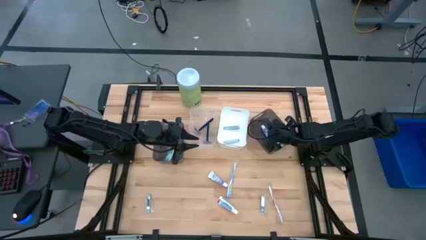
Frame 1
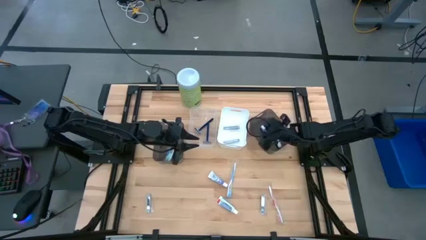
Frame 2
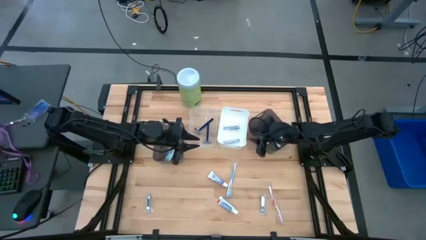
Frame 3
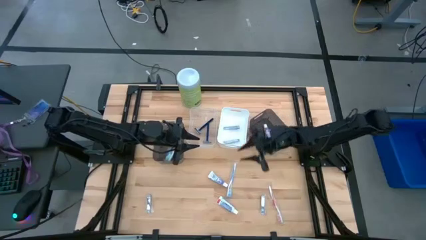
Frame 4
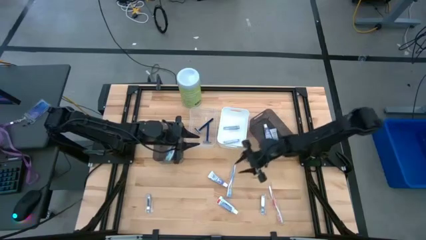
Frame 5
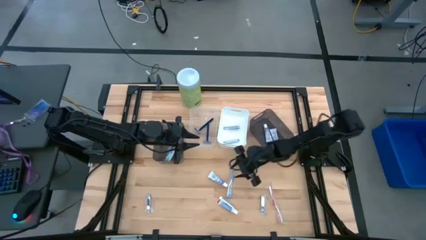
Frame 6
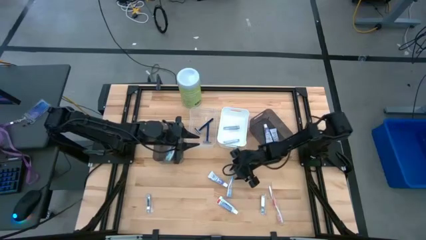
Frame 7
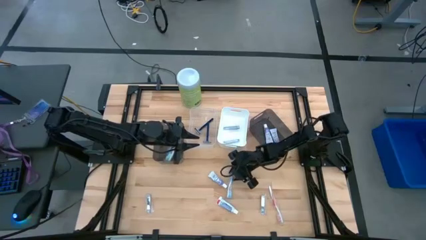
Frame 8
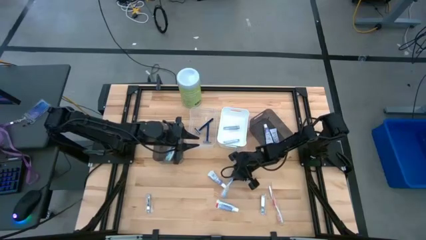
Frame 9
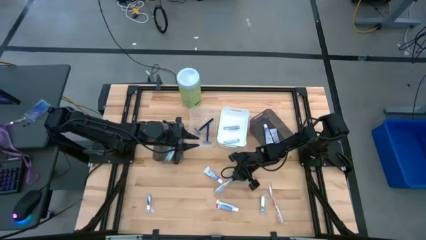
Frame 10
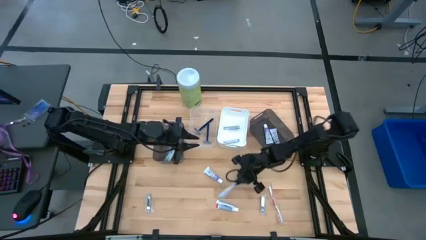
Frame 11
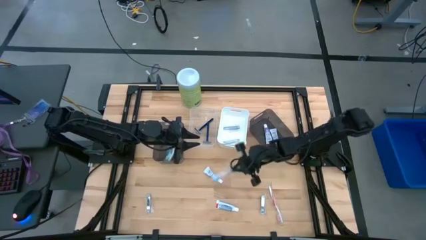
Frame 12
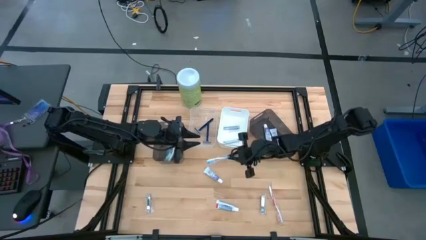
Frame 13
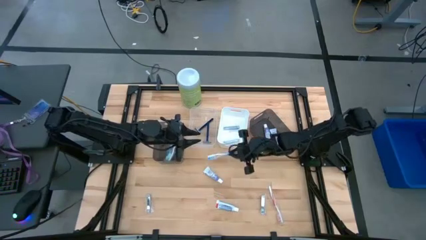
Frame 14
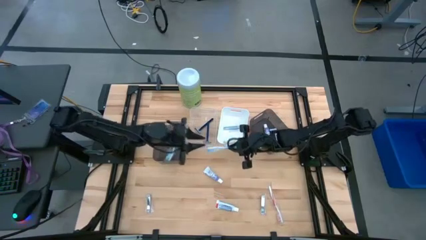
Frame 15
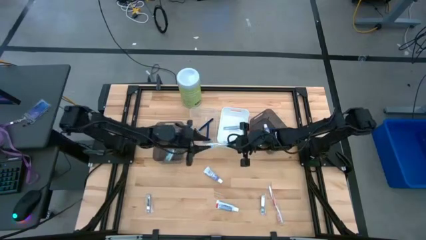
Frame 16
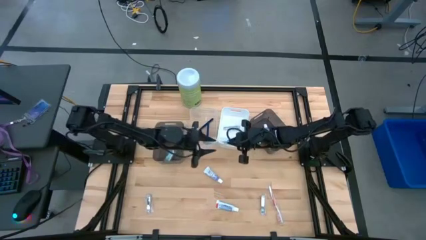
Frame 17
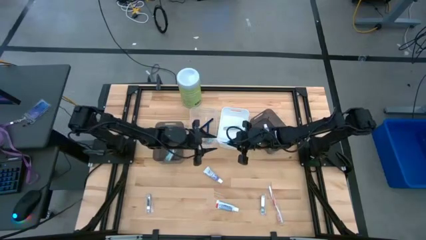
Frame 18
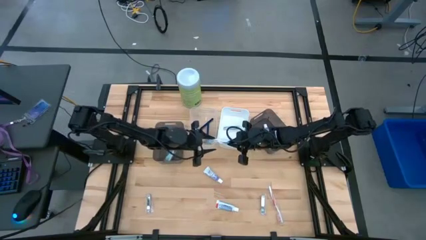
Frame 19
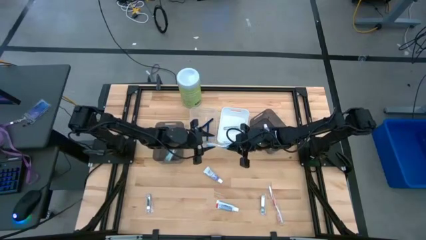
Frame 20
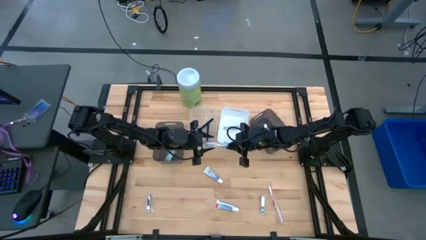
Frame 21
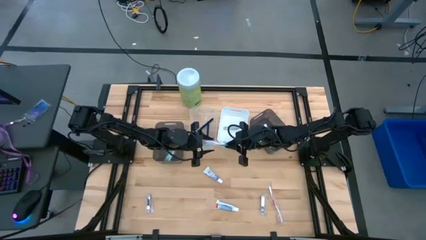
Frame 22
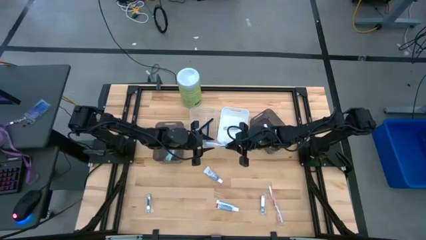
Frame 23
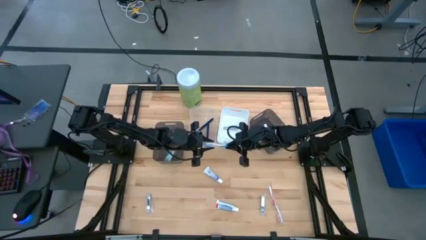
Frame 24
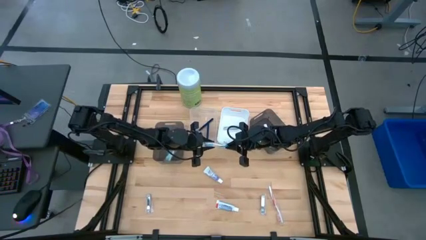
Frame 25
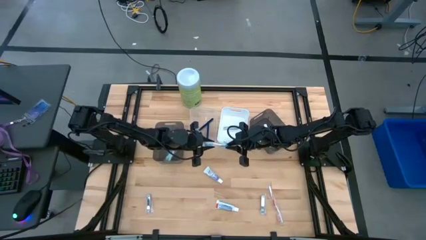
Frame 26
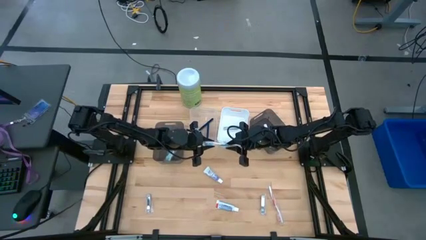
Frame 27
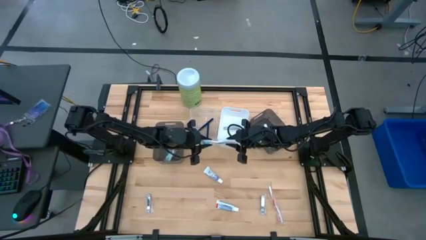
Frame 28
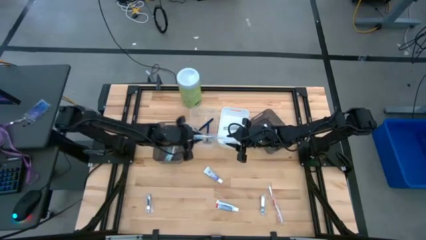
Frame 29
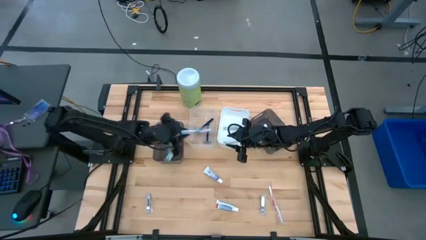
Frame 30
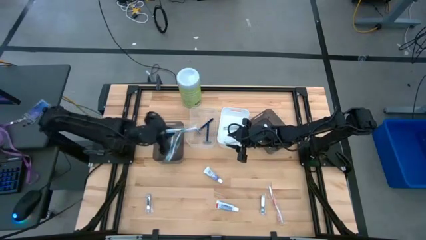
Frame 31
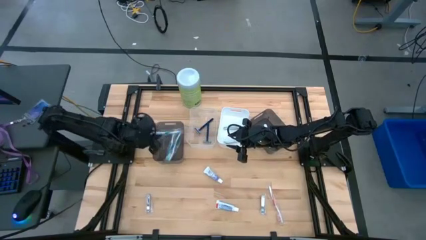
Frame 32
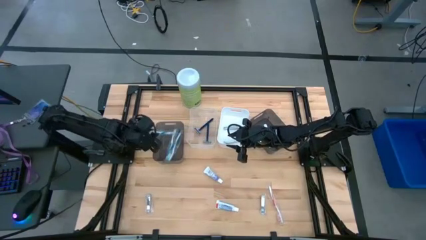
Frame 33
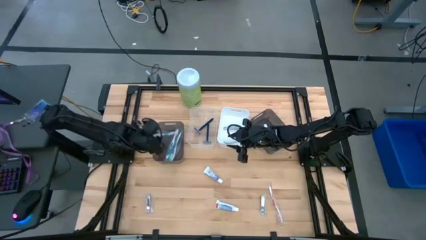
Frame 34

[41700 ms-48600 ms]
Task: Pick & Place Travel size toiletries
Put the blue toothbrush into the left black bin

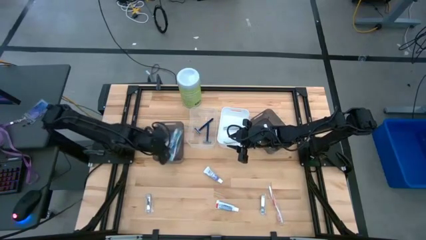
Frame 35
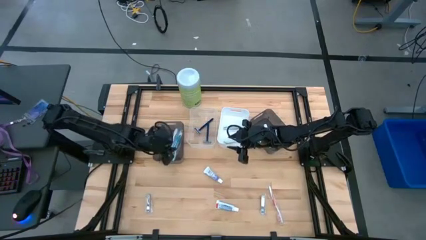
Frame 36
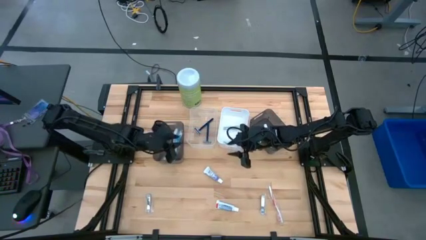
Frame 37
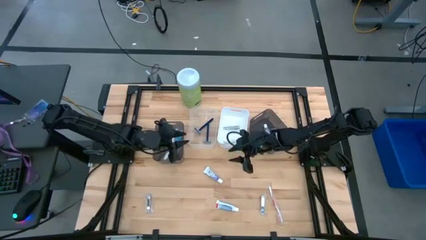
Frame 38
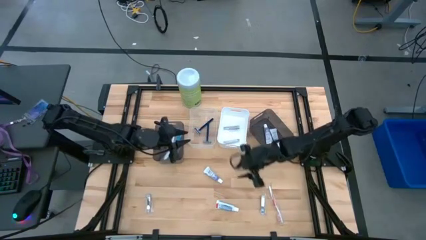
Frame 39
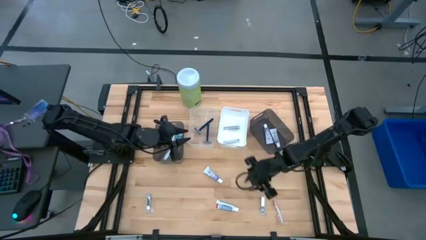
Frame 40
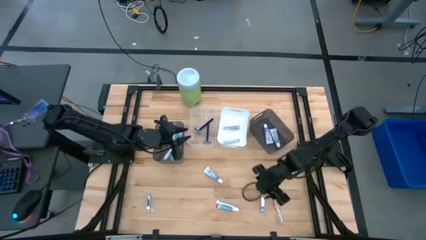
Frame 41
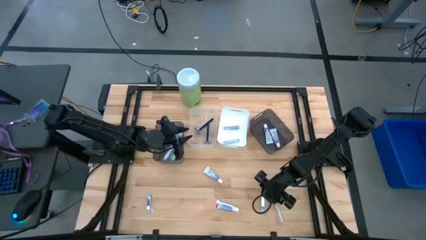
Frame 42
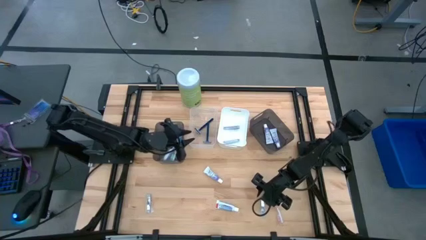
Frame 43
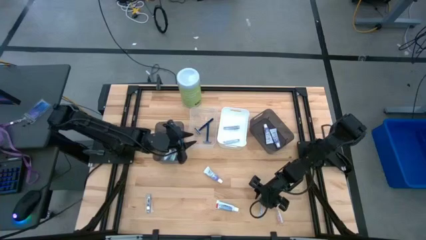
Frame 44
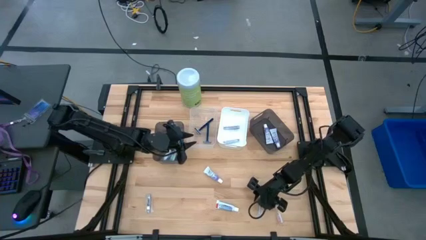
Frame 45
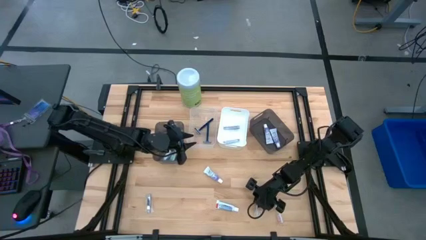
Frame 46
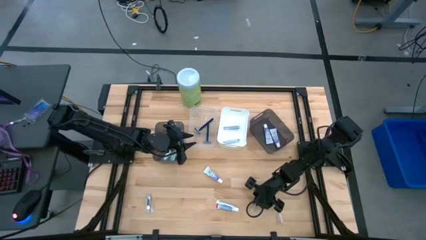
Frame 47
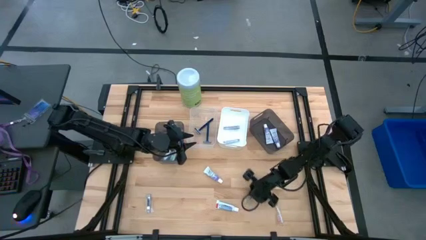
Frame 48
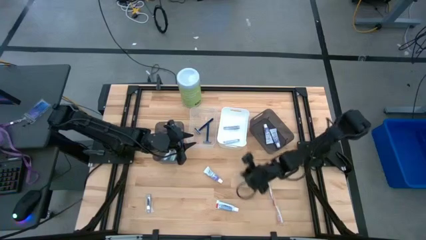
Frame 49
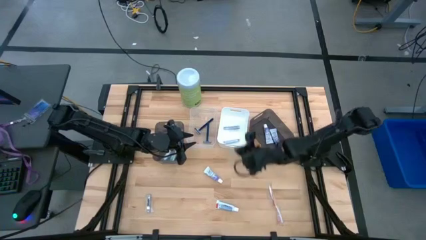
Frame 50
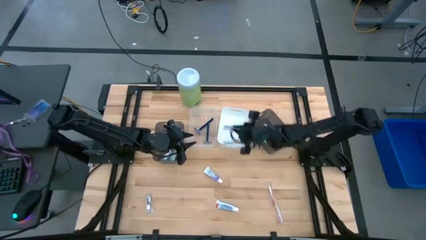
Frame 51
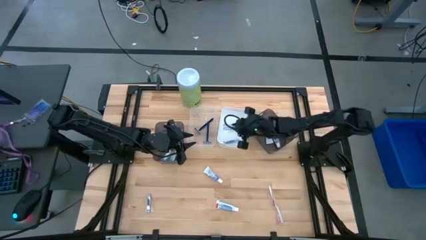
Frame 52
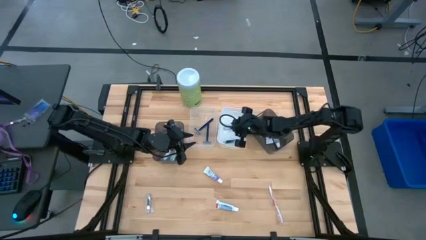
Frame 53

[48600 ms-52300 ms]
Put the silver nail cutter into the white bin

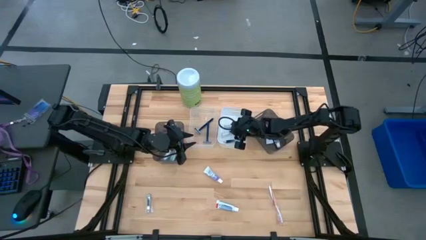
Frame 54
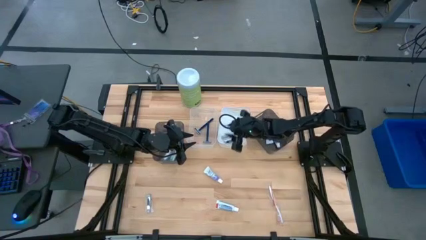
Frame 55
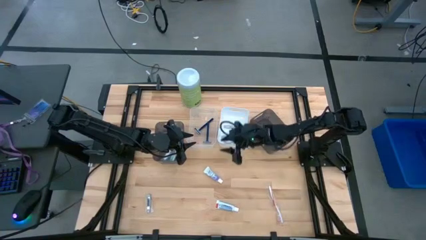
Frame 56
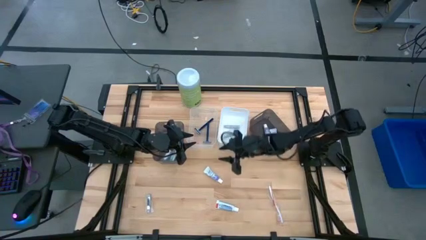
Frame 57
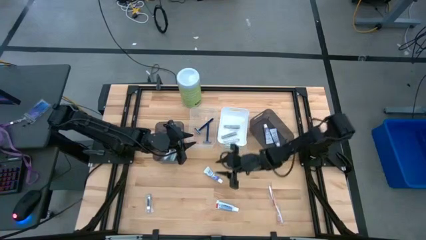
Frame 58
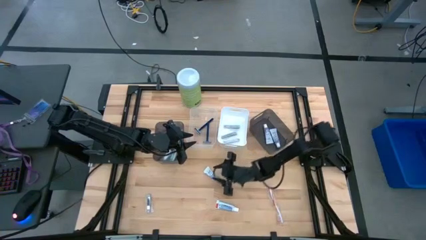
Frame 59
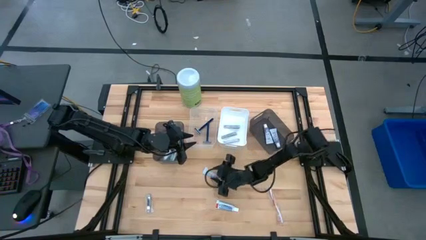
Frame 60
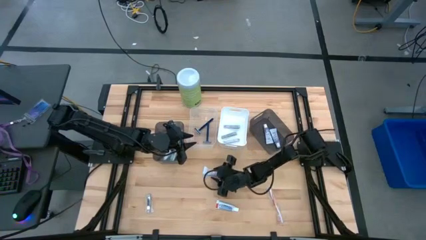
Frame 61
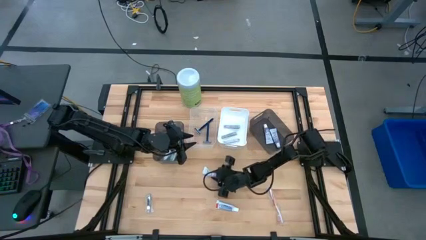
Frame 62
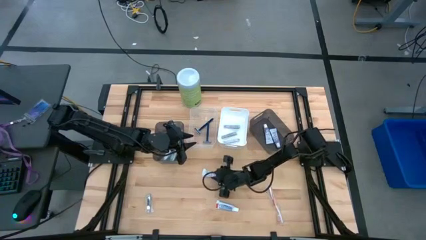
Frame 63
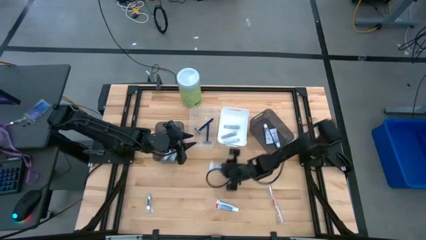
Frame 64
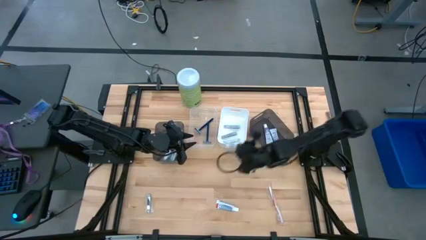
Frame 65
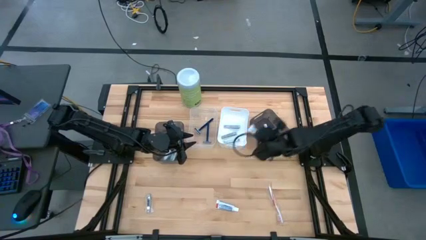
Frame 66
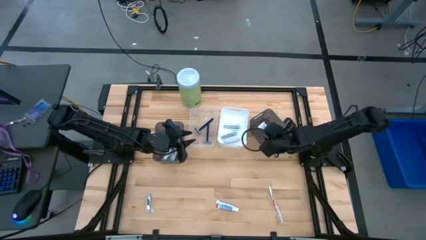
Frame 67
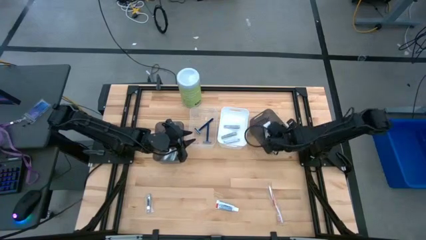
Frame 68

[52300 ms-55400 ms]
Put the purple toothpaste into the right black bin

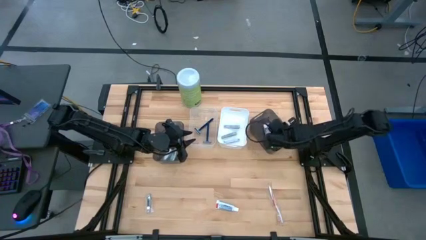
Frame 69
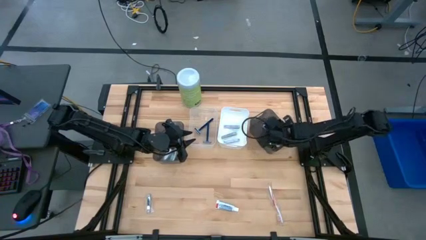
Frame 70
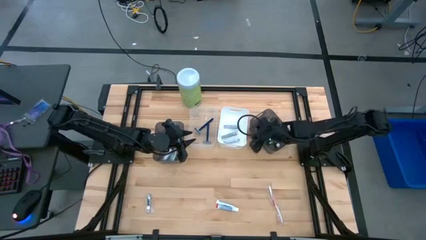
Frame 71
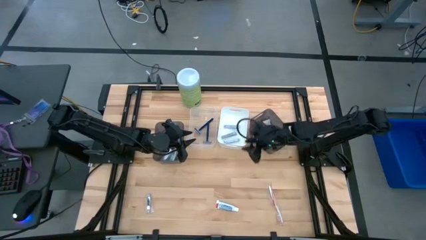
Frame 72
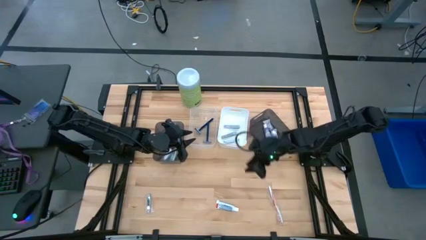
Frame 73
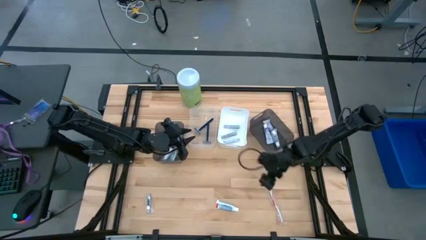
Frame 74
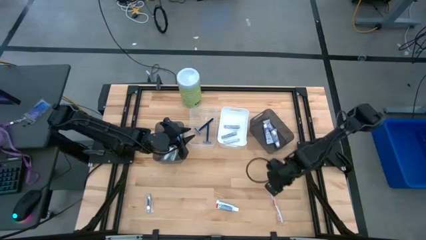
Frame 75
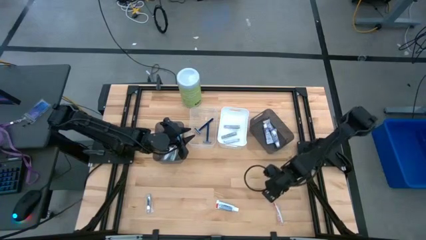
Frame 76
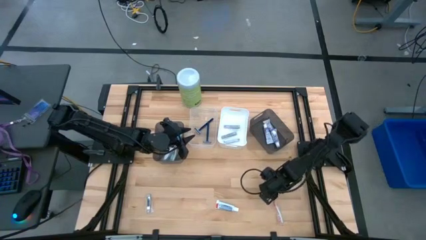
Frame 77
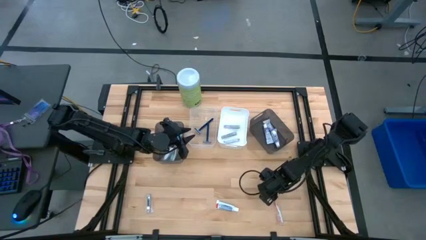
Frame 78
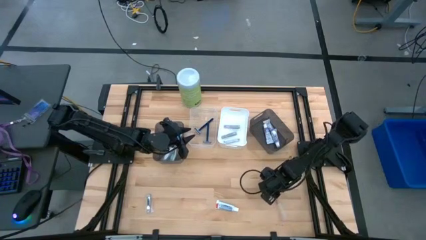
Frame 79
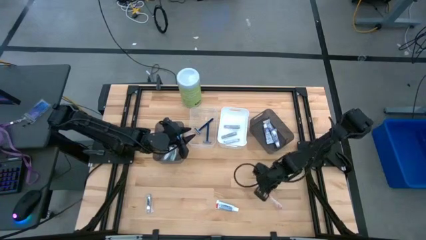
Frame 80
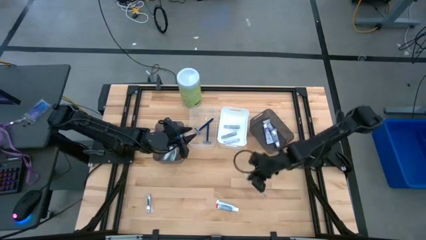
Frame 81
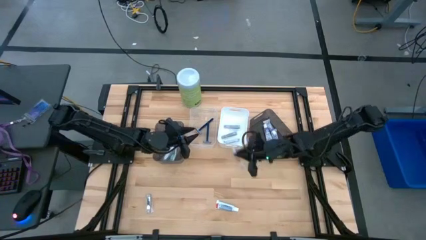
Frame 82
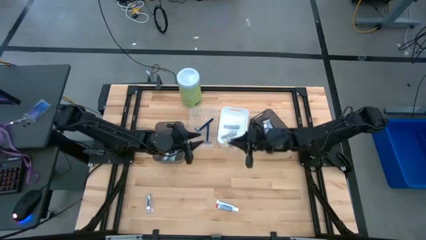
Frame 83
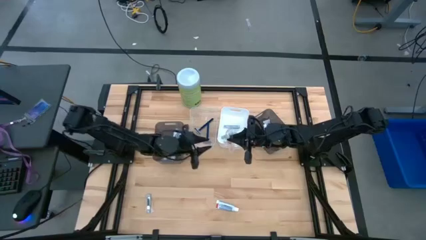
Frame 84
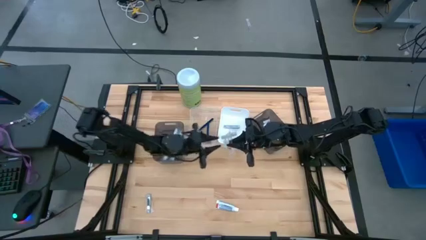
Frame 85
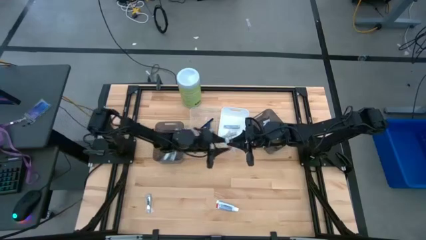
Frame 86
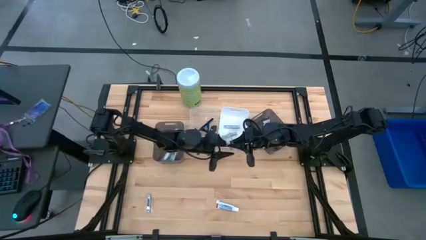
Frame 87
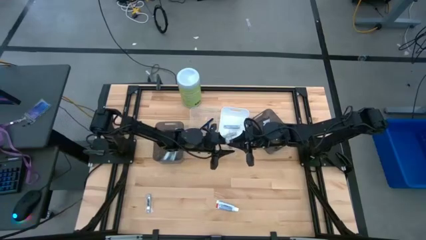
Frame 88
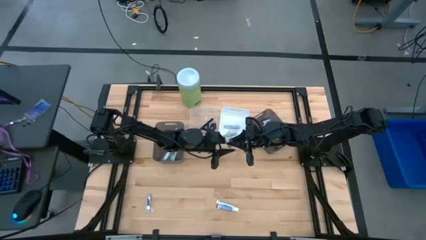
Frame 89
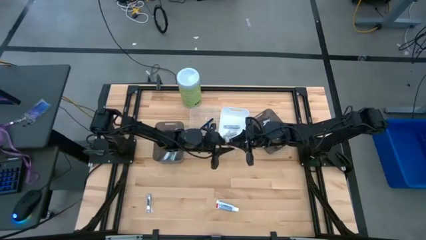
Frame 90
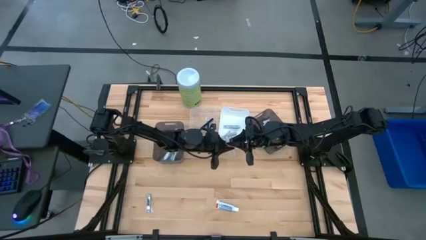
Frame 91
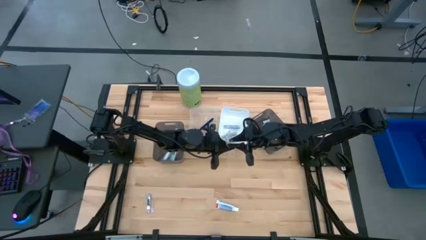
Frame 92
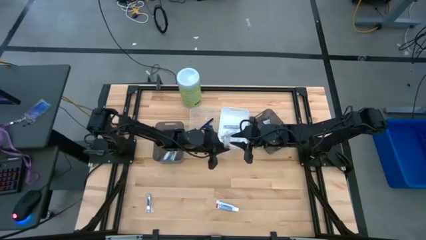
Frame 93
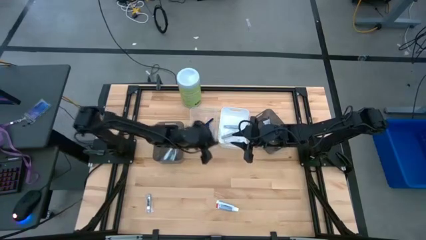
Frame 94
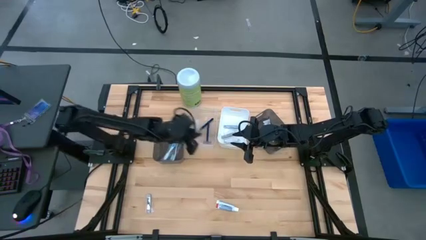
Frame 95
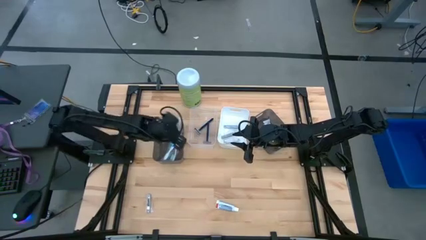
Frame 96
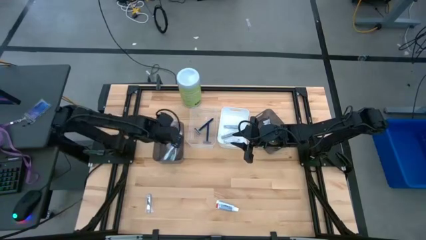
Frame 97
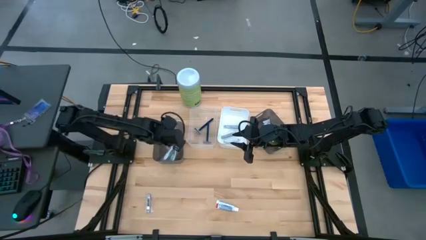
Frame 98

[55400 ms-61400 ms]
Put the orange toothbrush into the left black bin
